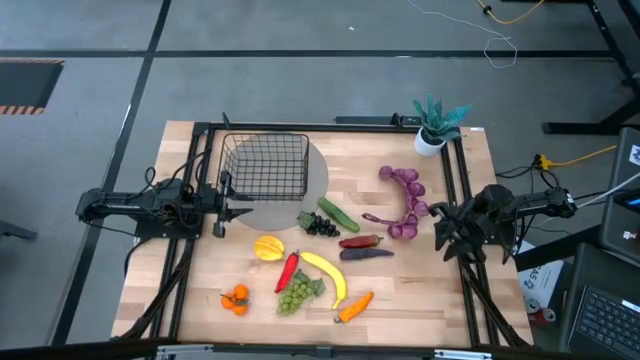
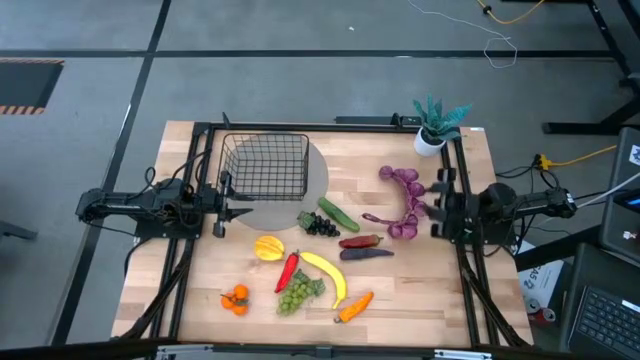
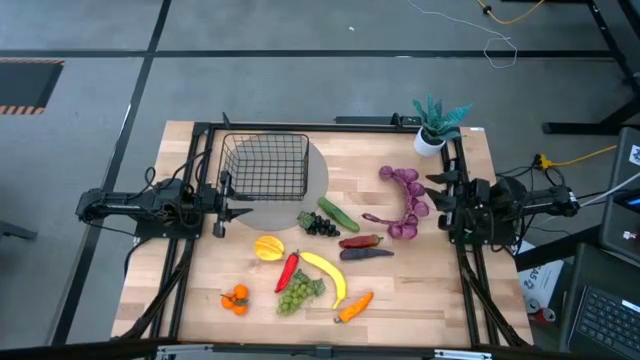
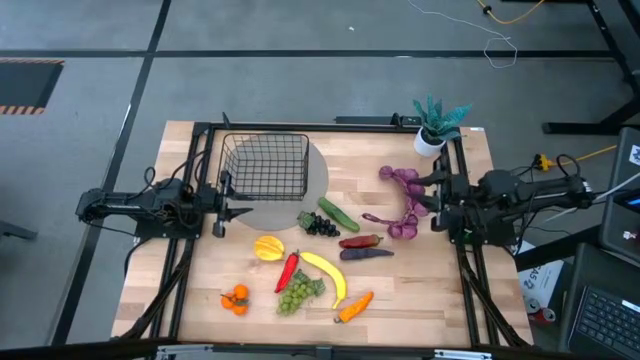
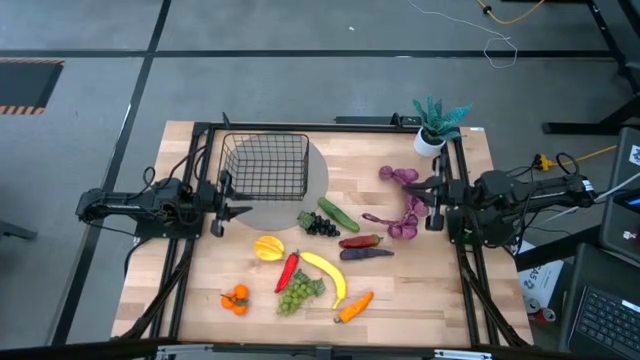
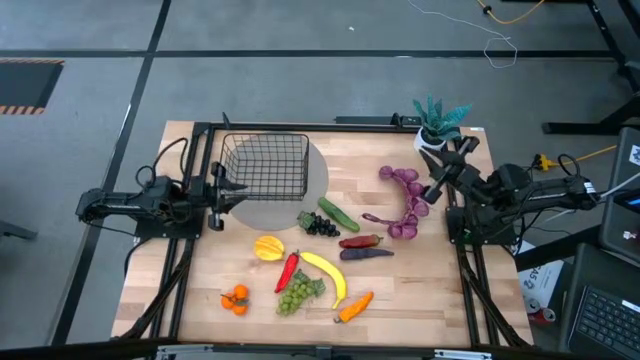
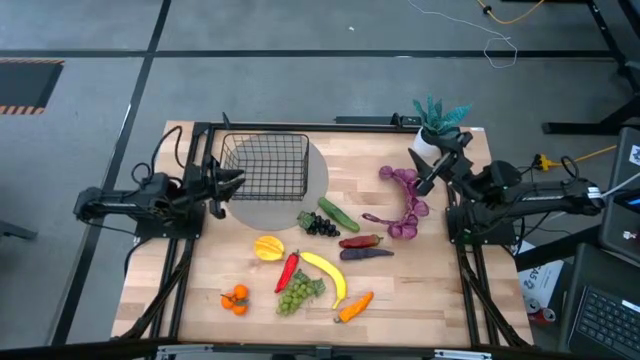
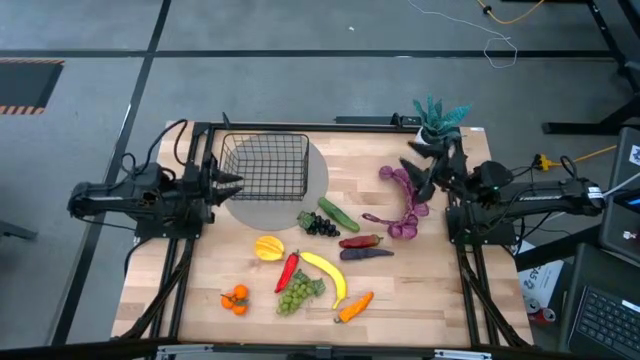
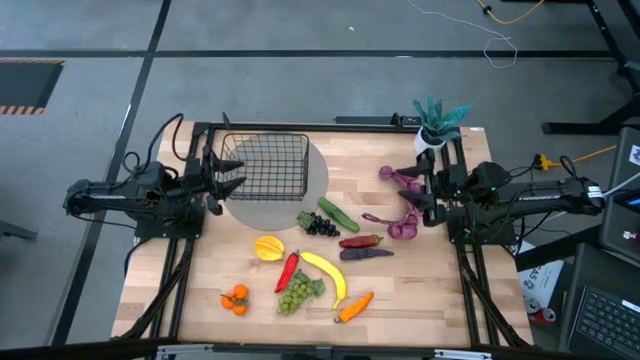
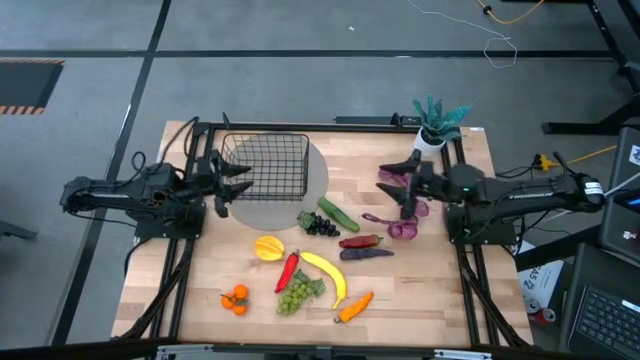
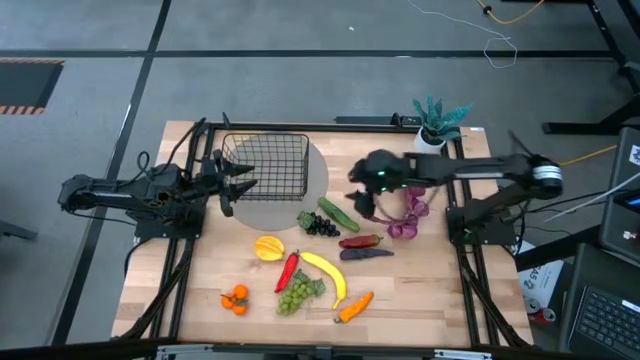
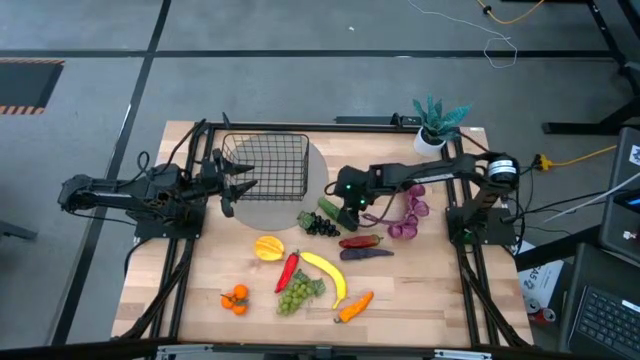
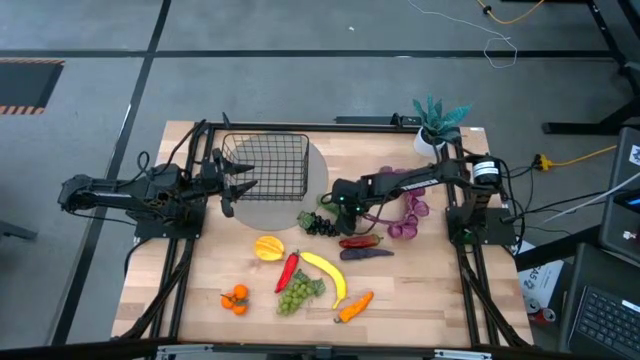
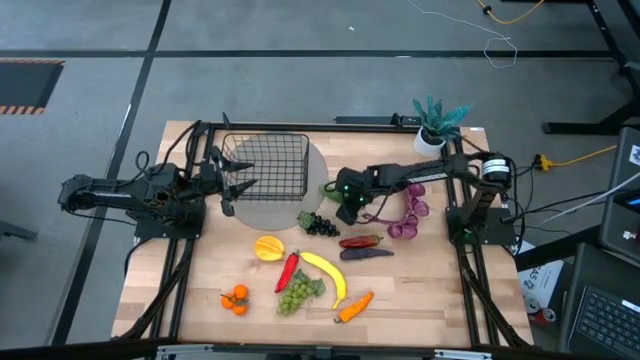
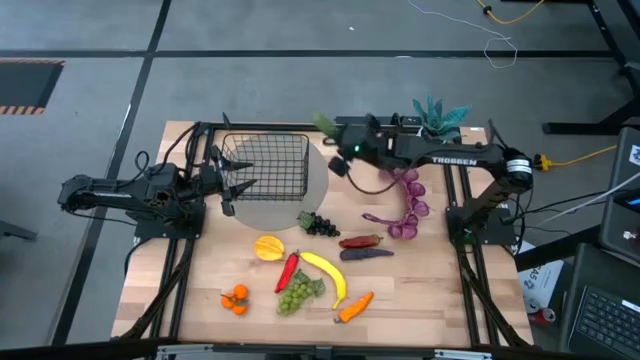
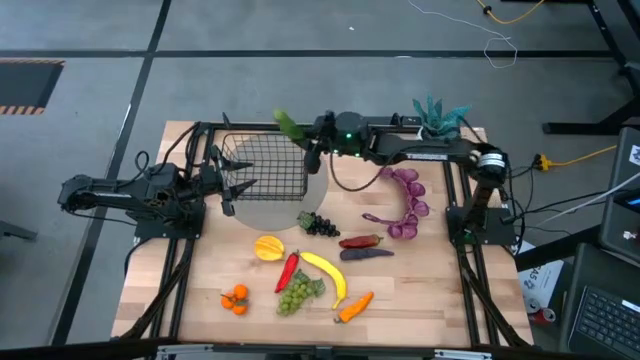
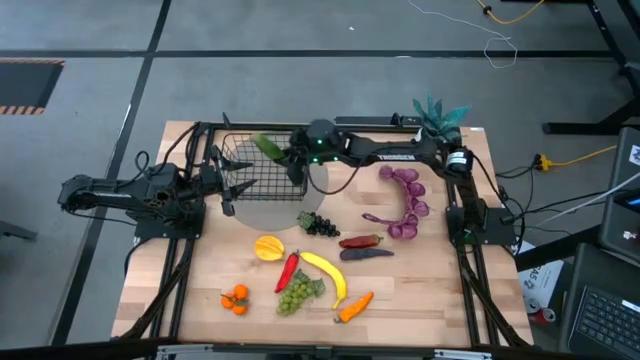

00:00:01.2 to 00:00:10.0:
Task: Build produce basket
Put the green chilli pepper into the wire basket

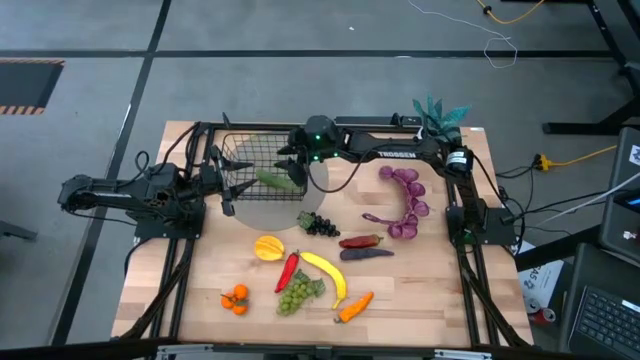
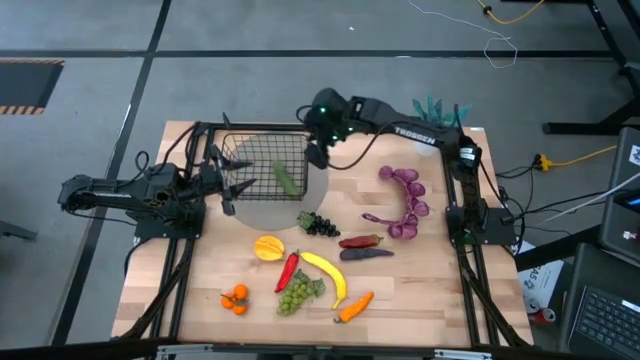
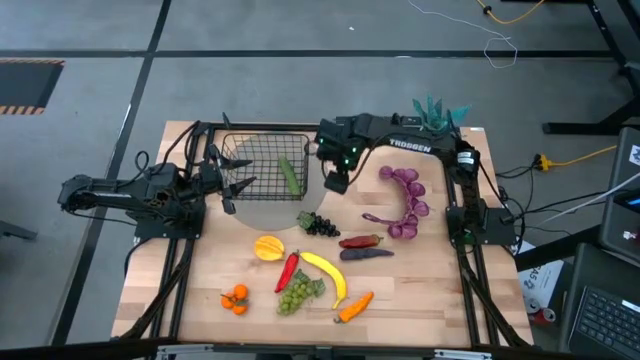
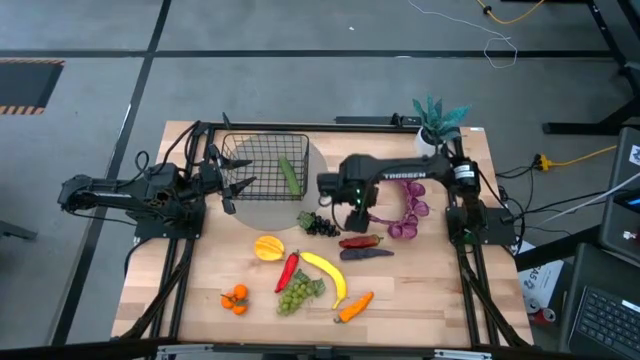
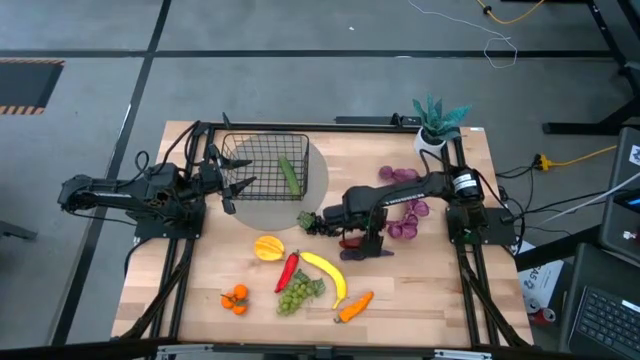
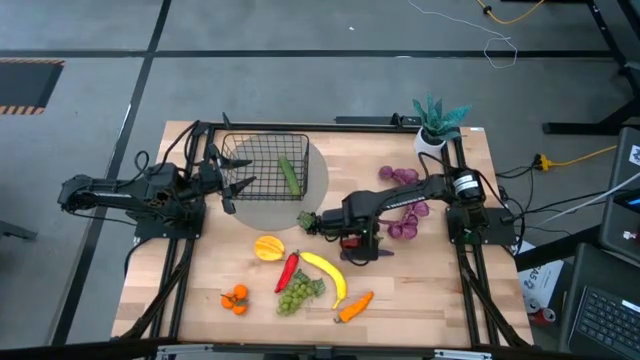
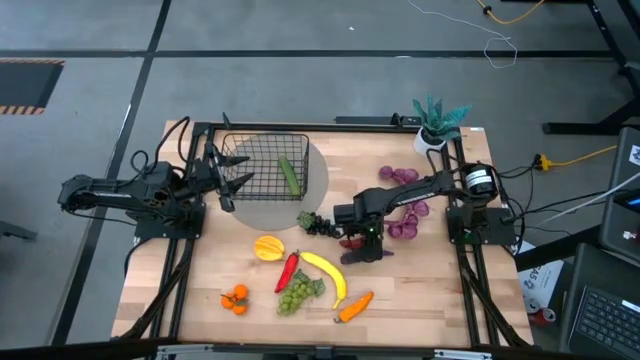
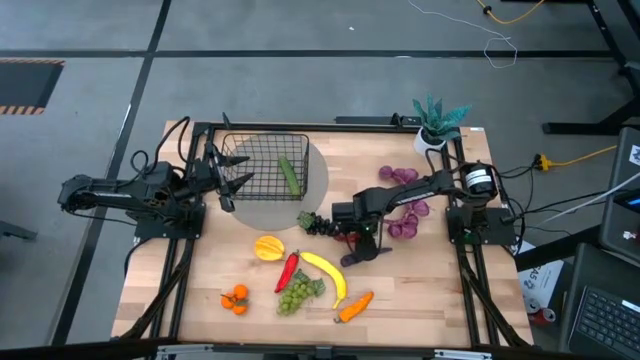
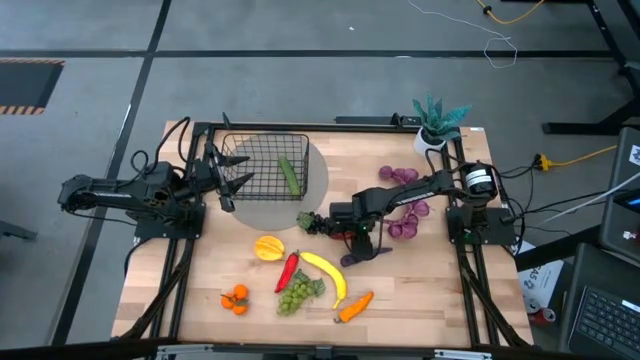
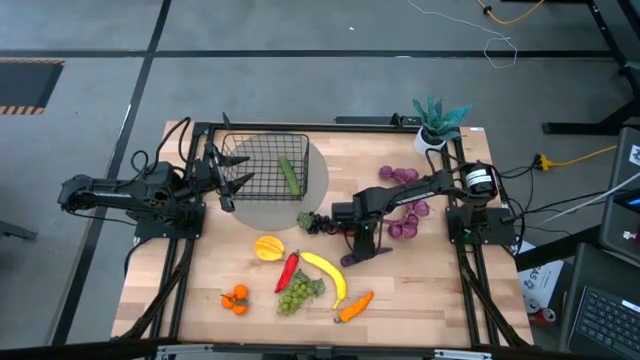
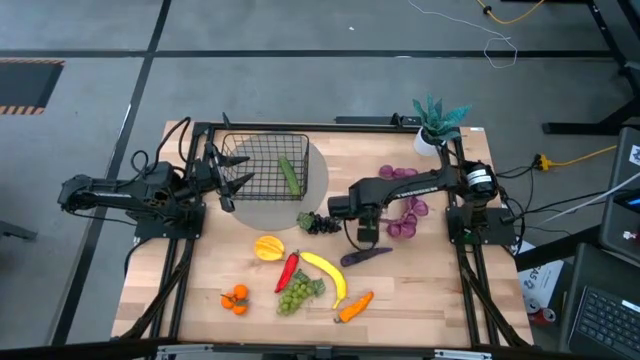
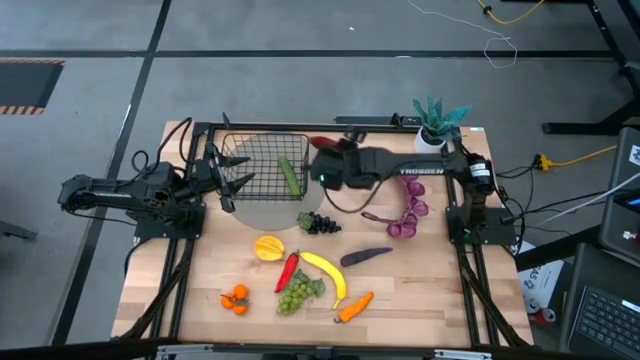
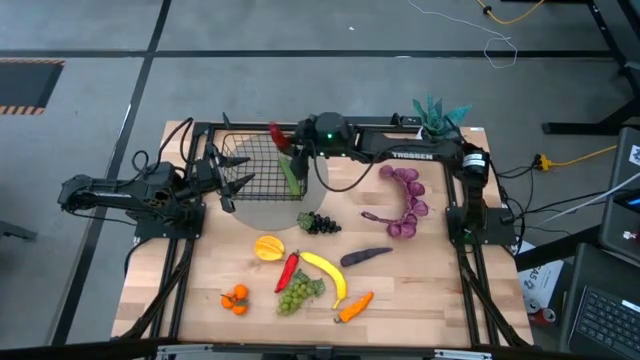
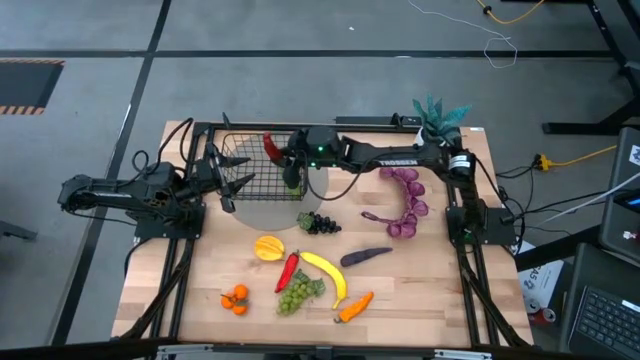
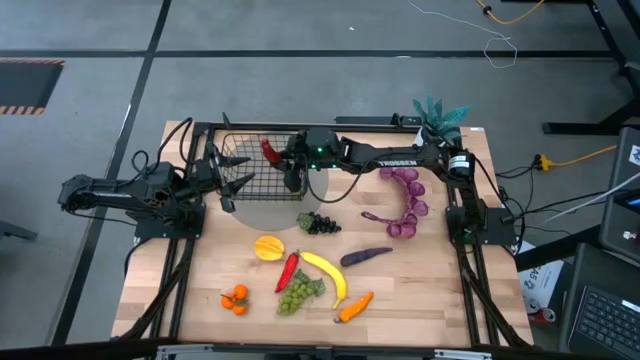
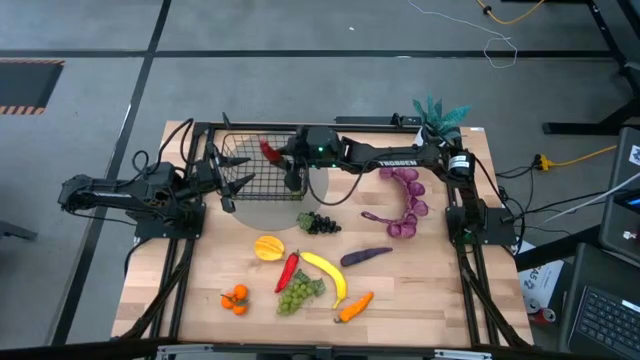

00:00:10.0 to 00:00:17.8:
Put the dark red chili pepper into the wire basket

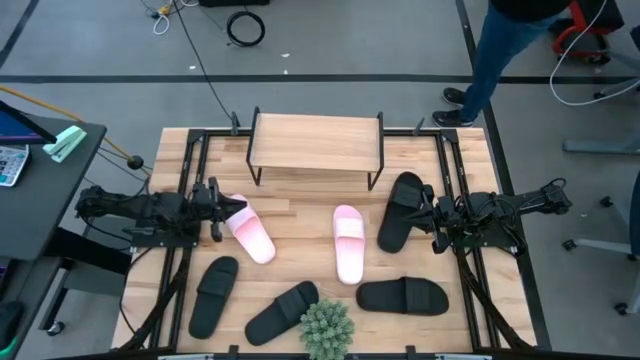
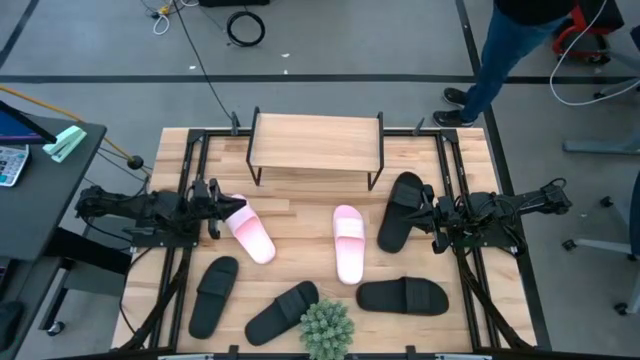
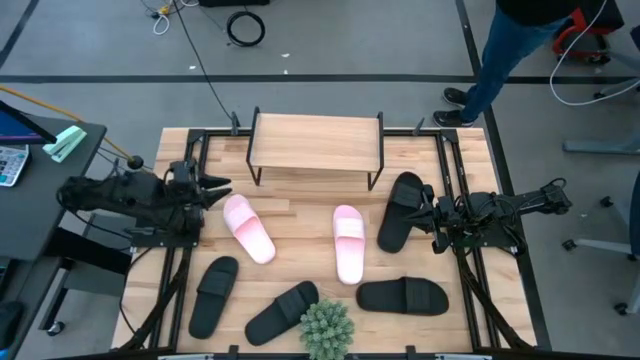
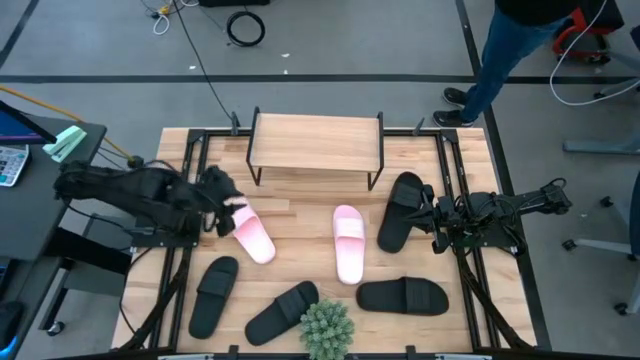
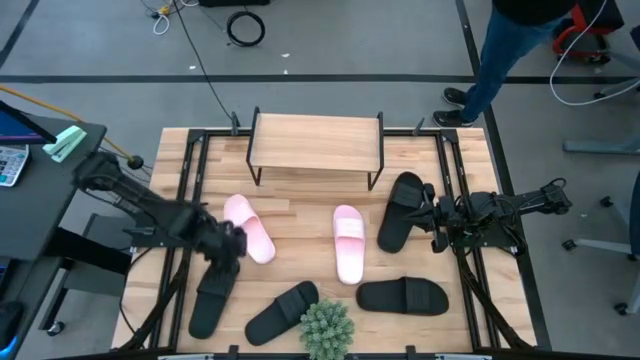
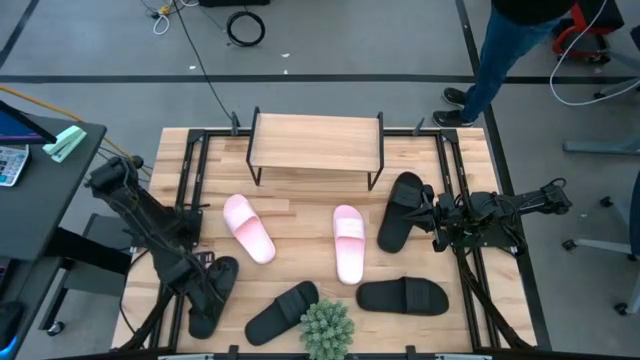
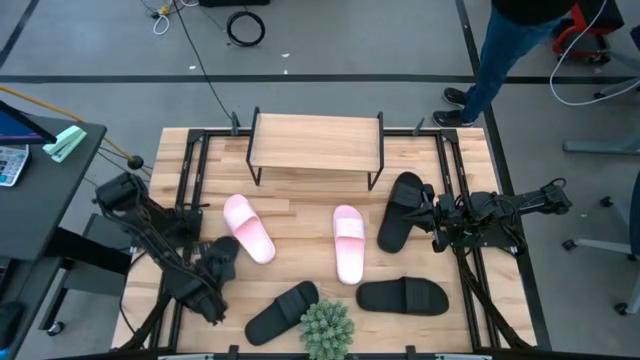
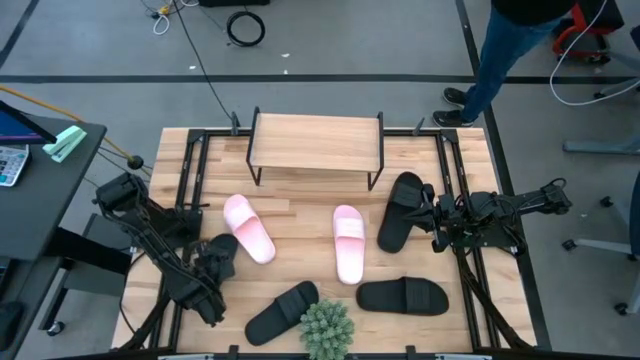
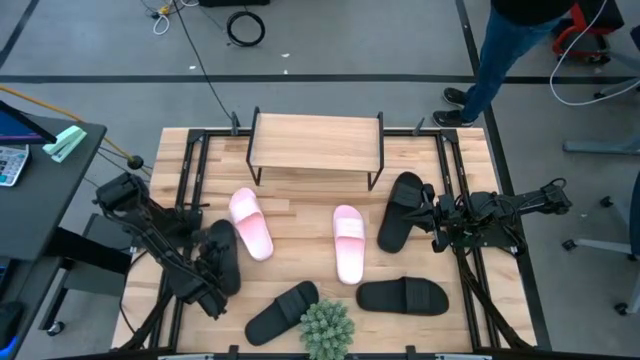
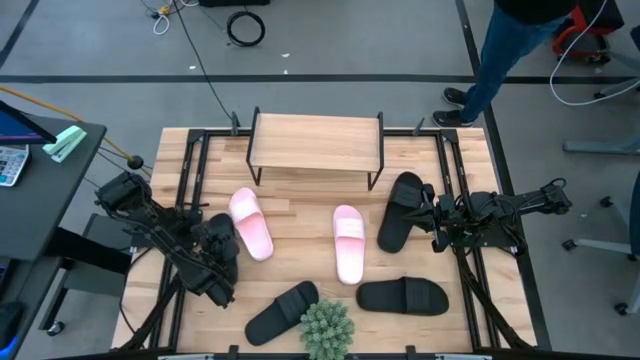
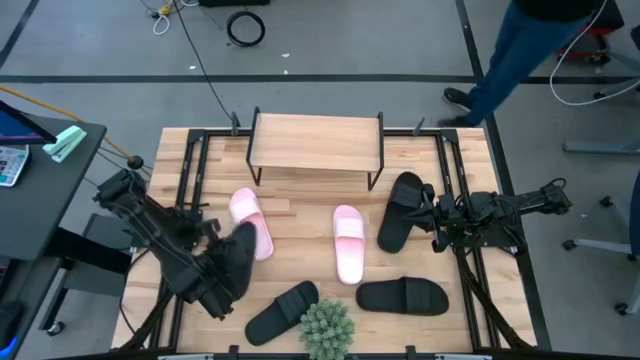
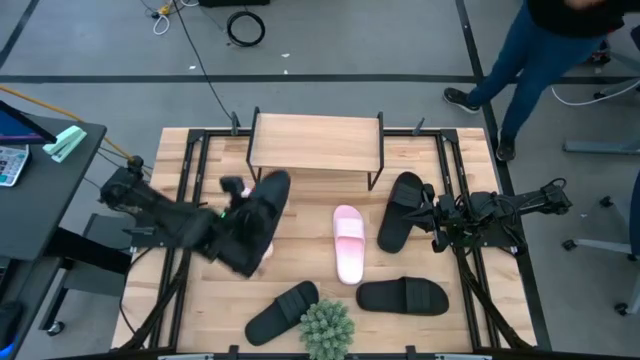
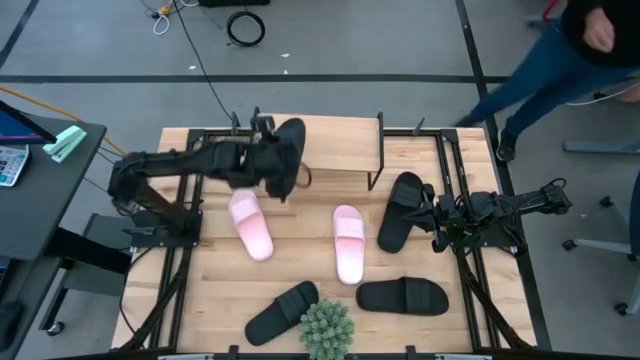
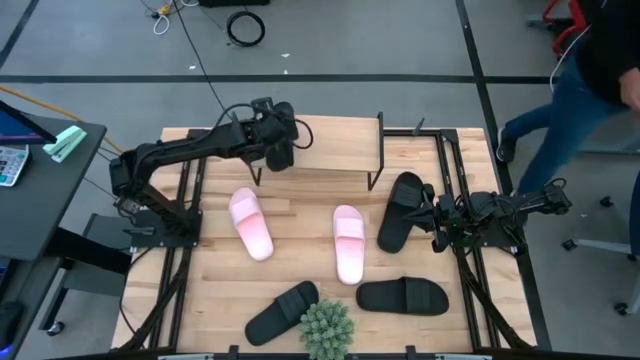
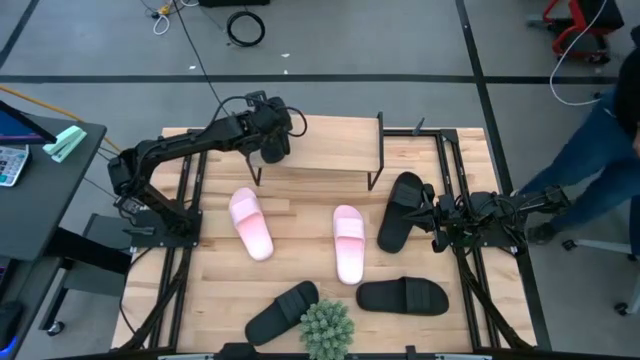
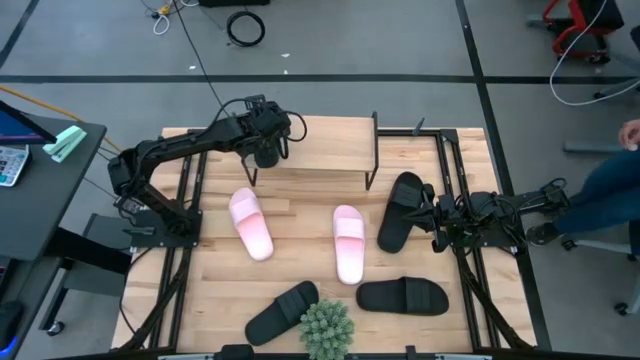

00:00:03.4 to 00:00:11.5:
Task: Pick and place slides into the shelf
Put the black slides on the shelf
